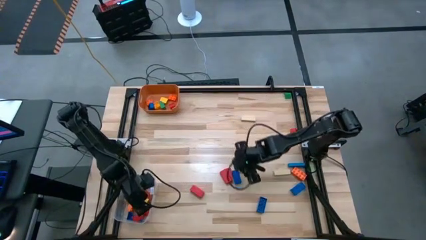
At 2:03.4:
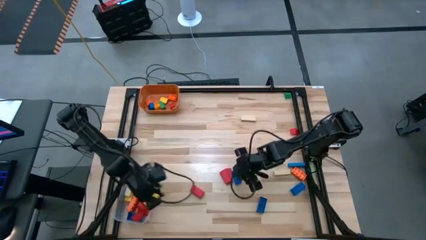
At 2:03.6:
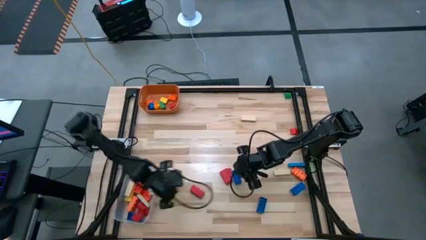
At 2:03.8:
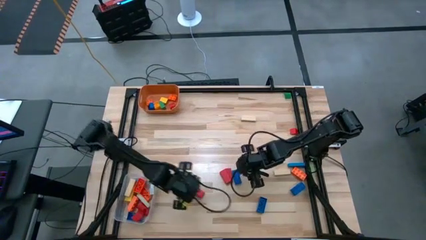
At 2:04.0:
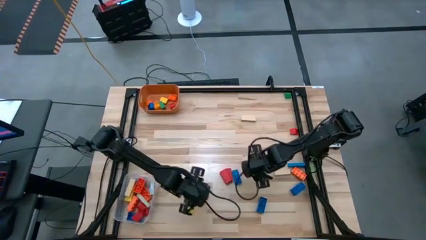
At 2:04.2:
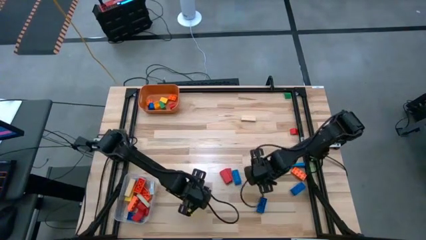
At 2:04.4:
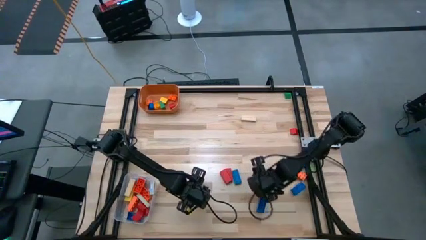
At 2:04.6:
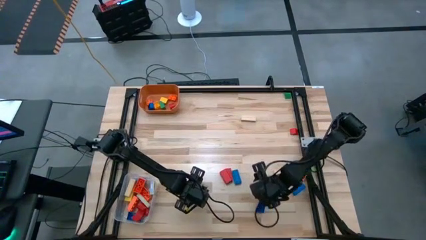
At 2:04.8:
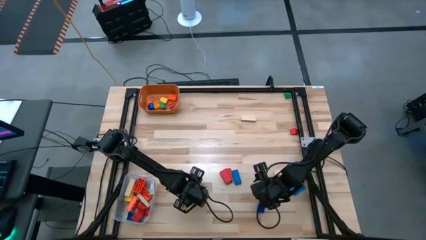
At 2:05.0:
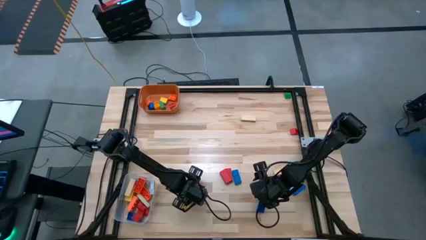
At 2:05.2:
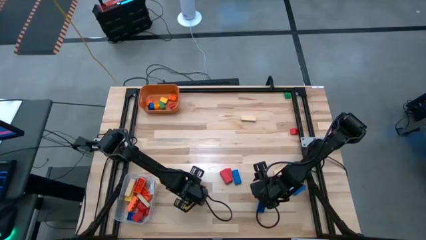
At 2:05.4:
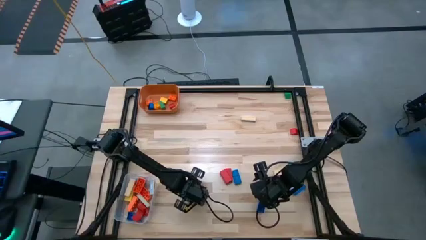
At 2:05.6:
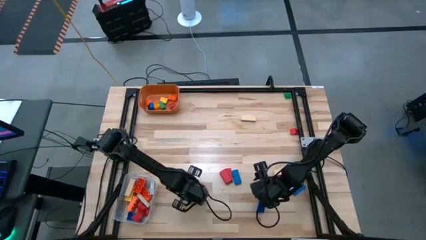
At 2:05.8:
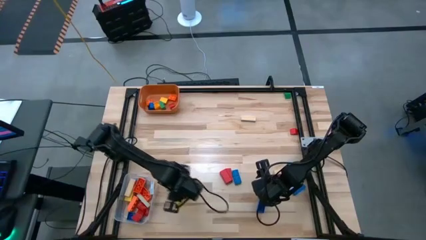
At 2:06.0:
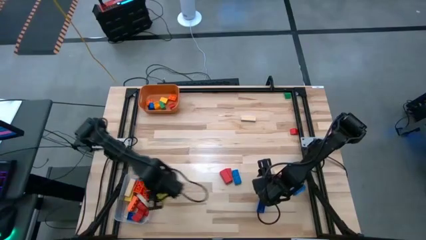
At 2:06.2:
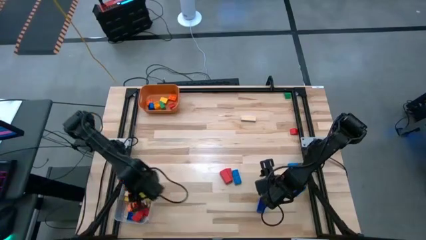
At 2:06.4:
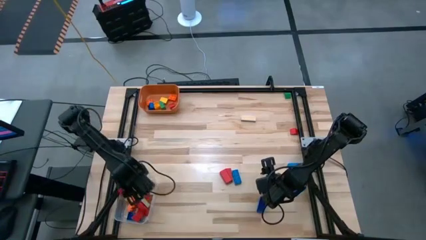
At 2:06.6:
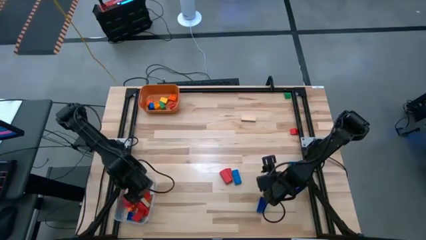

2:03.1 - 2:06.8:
Task: Sort blocks by size
Put the large red block into the transparent bin

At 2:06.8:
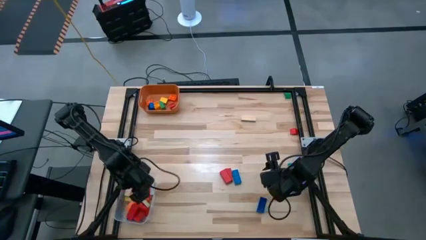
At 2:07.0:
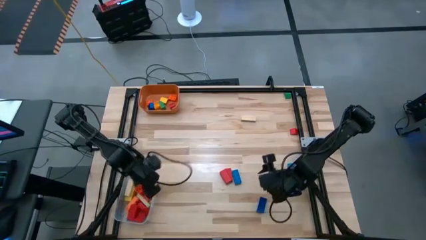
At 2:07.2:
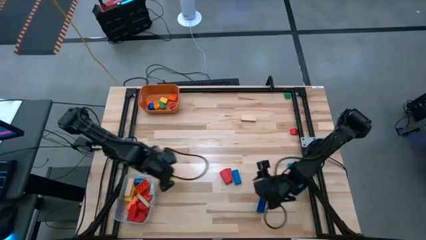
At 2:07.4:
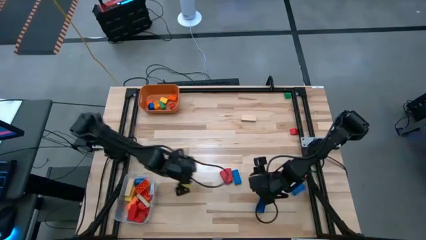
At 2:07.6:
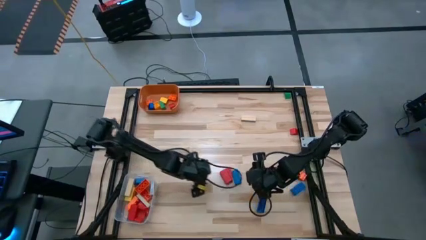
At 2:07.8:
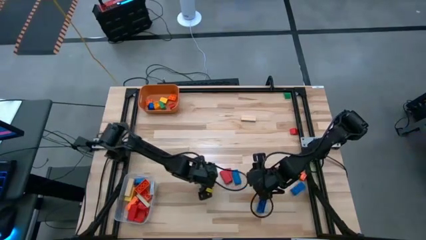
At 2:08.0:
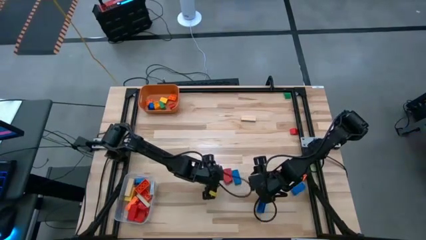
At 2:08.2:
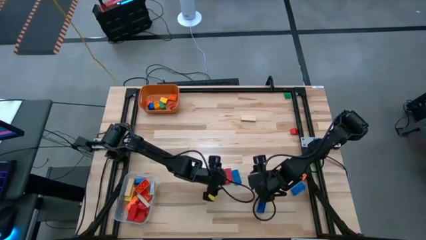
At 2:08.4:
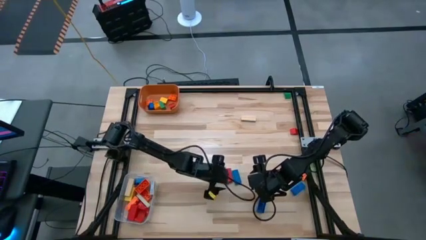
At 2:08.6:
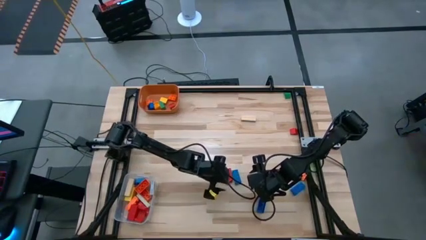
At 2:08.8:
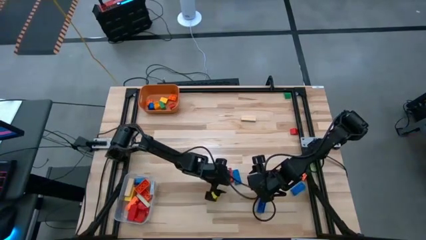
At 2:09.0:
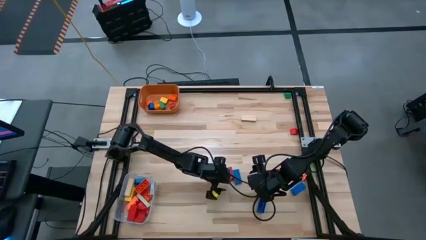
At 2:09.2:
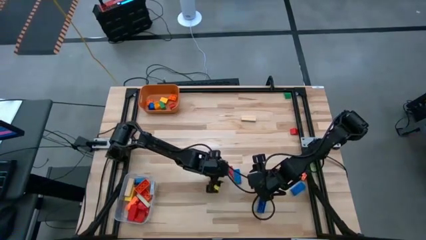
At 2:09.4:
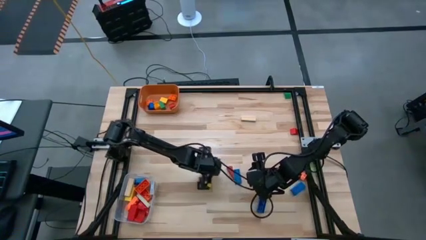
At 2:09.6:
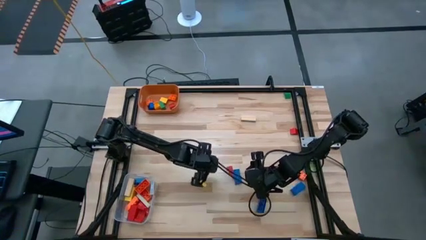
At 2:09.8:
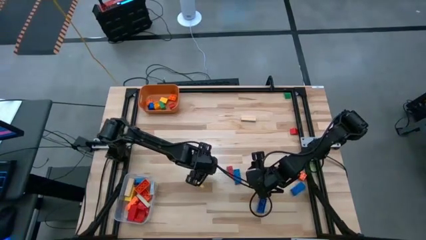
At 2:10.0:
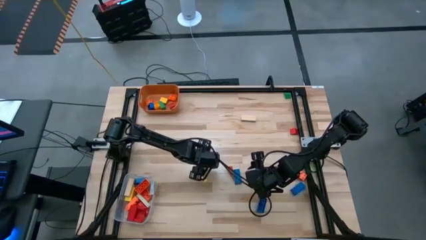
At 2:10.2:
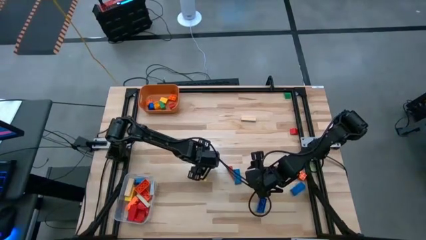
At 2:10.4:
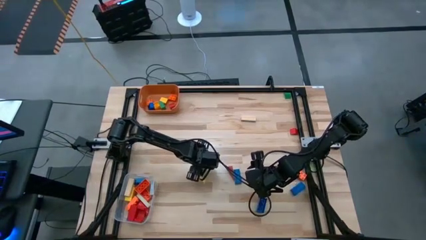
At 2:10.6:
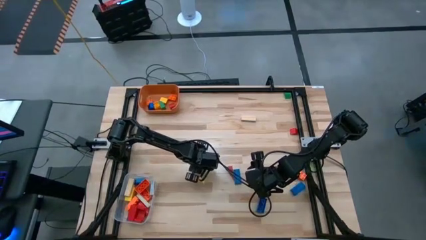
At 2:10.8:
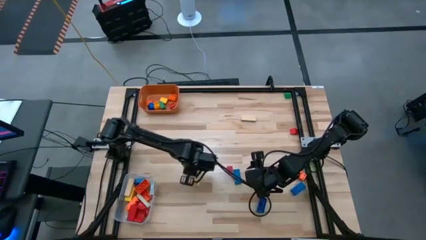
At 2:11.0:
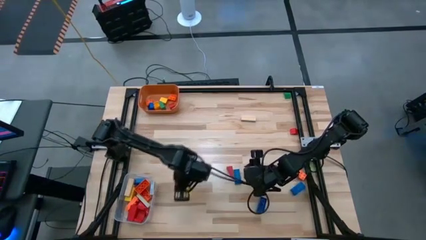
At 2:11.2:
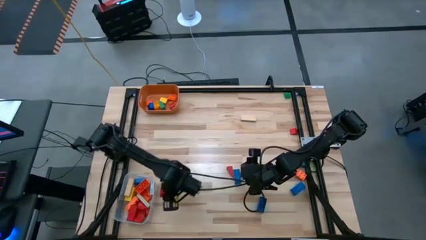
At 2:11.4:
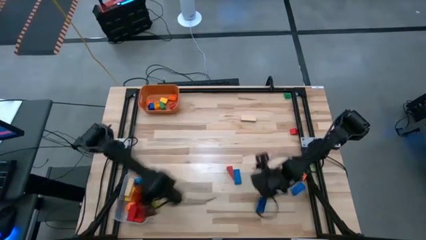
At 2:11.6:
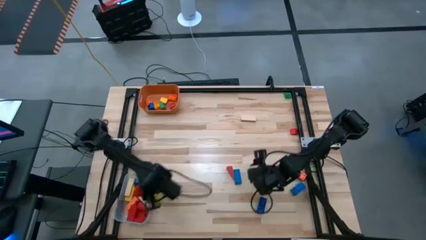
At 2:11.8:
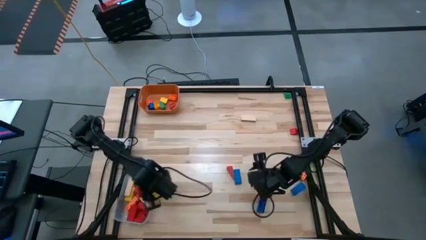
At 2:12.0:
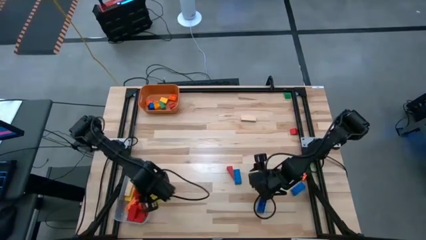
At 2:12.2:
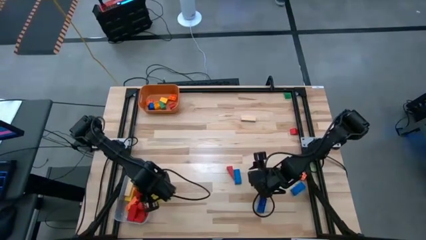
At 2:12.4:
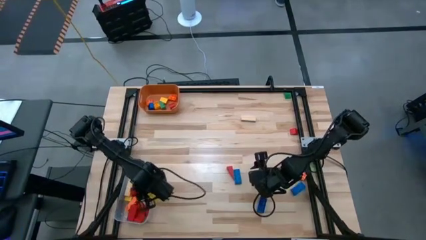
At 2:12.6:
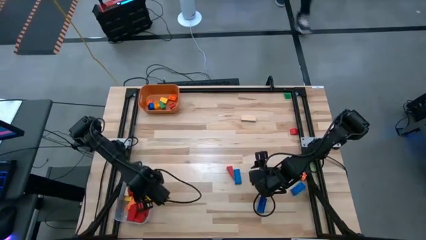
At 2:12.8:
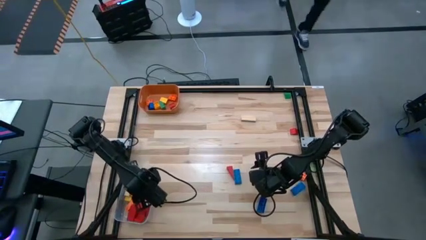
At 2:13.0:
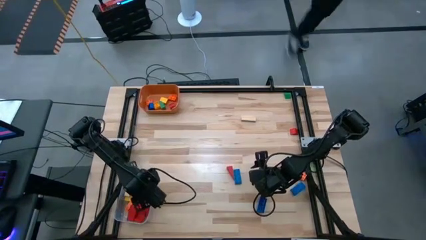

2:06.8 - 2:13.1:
Put the large red block into the transparent bin

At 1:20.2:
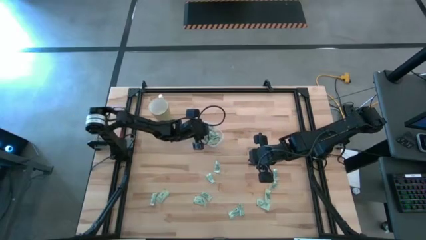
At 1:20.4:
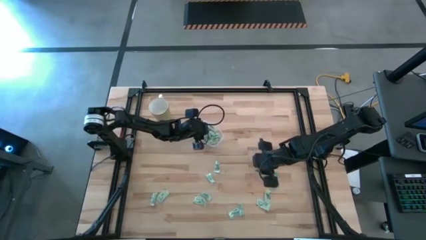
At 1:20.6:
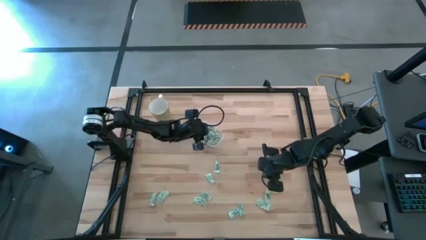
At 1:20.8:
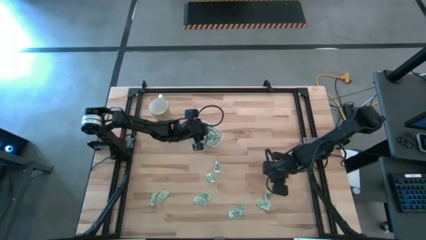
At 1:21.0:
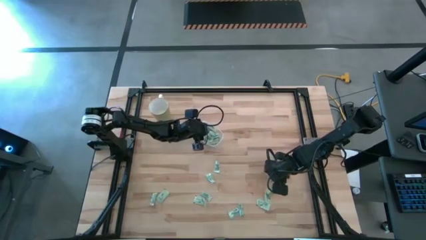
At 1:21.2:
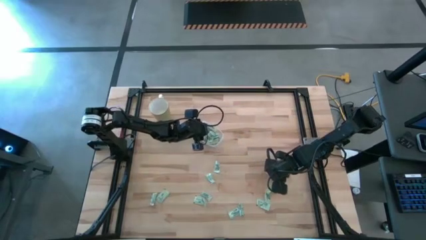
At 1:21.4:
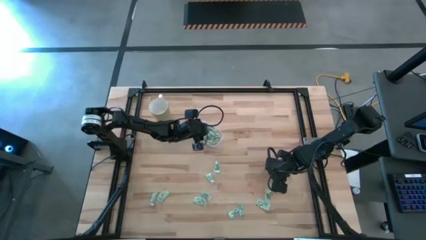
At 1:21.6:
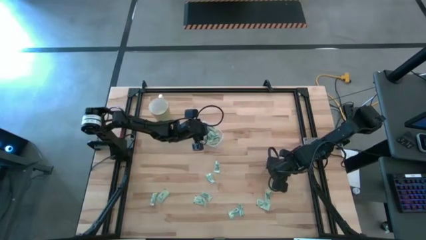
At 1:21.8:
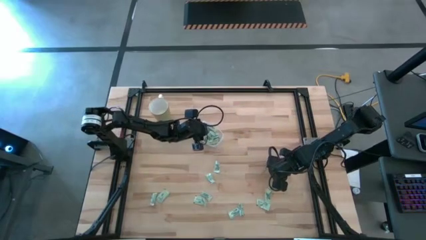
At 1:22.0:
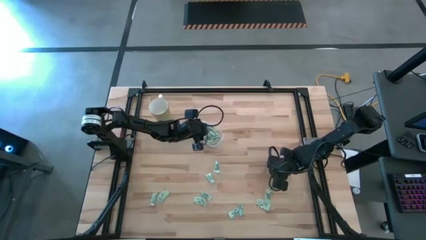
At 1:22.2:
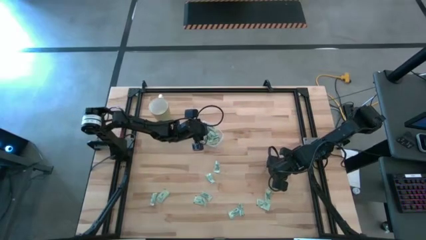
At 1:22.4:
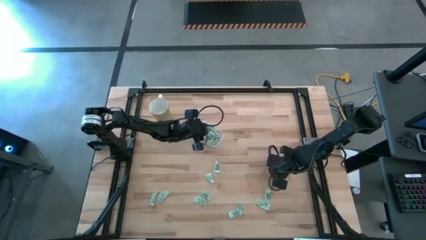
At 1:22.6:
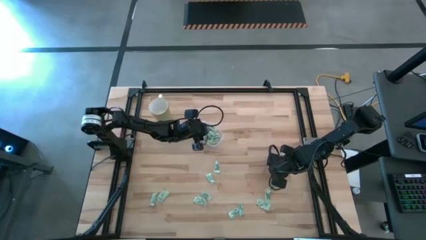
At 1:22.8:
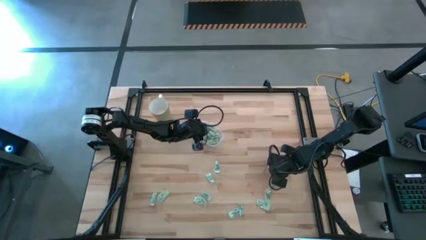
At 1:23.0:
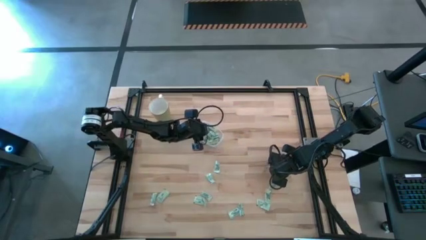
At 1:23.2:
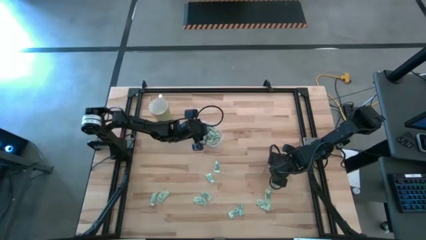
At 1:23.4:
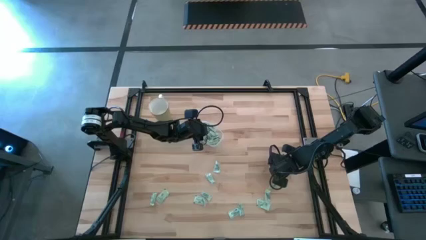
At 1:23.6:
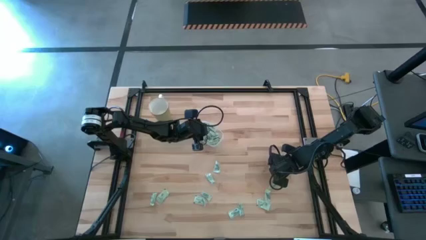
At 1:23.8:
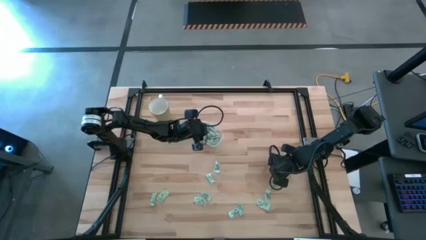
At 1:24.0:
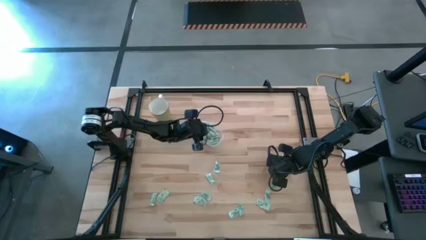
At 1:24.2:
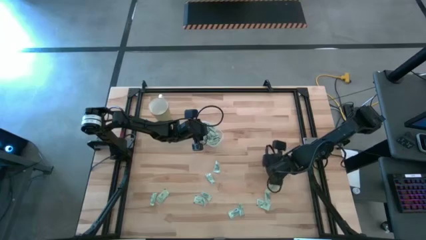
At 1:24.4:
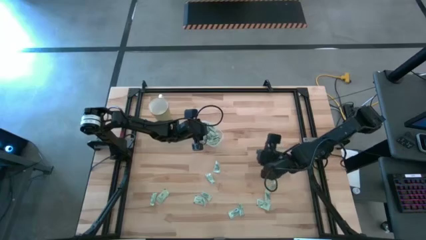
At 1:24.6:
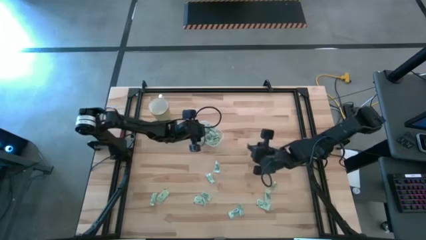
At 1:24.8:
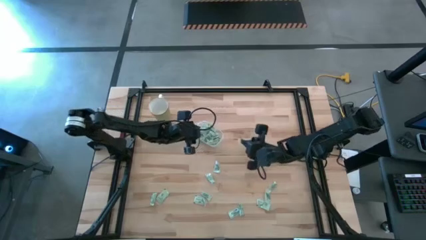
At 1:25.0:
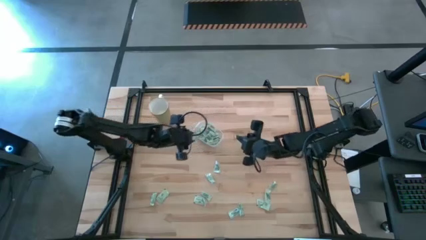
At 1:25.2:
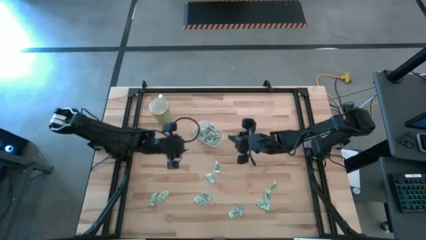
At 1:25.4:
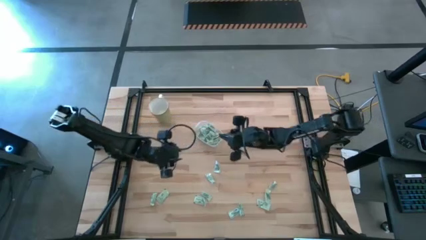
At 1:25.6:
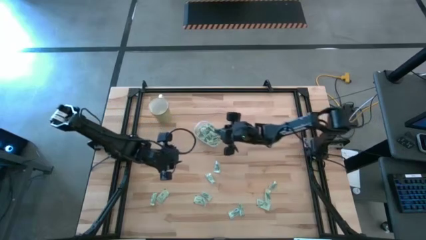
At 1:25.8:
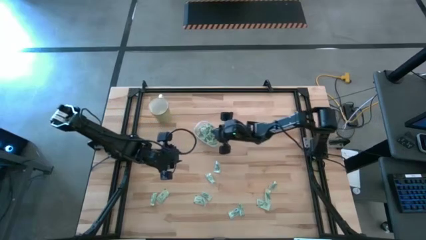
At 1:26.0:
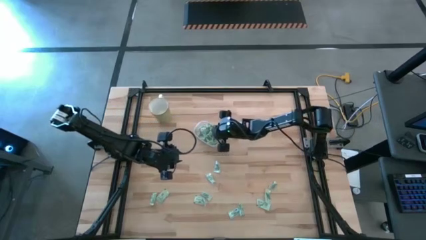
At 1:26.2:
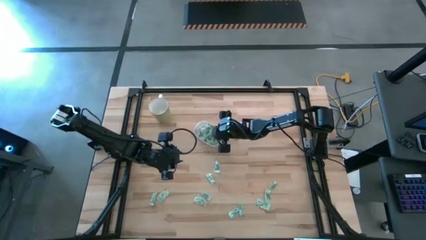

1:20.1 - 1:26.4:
Task: Pick and place Stevia / Truvia into bins
Put the stevia packet into the transparent container
